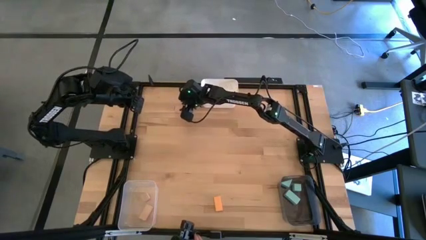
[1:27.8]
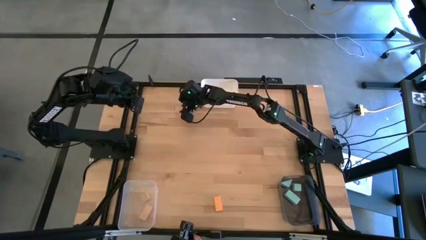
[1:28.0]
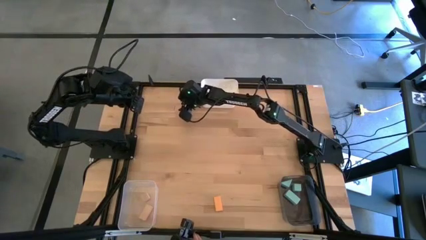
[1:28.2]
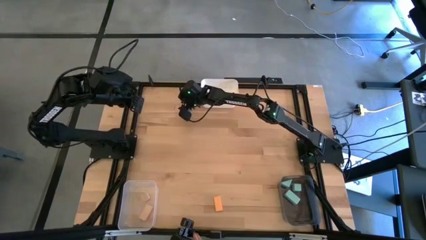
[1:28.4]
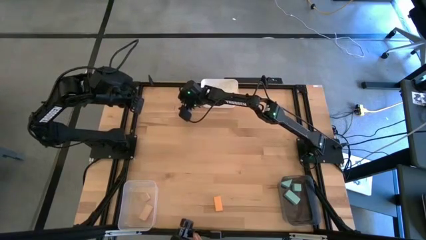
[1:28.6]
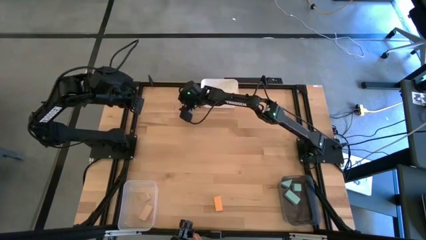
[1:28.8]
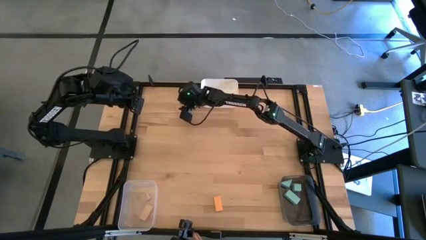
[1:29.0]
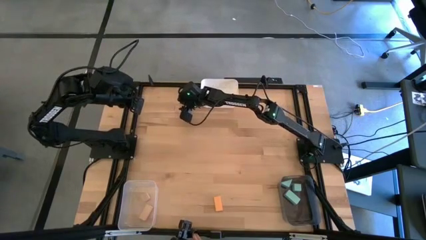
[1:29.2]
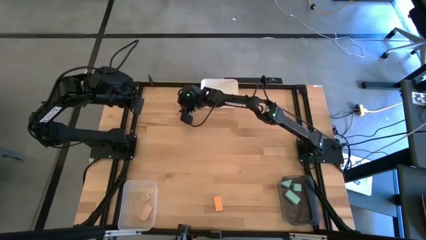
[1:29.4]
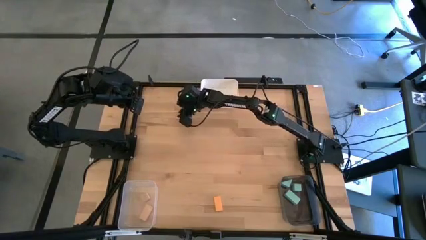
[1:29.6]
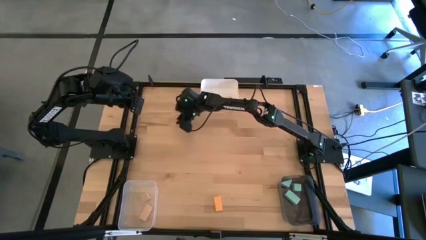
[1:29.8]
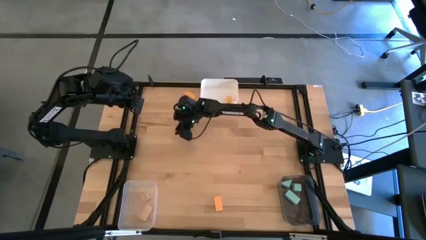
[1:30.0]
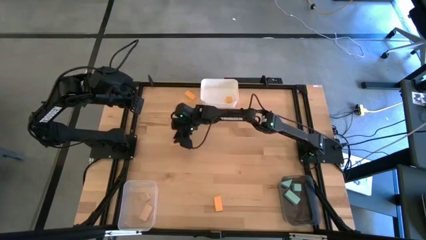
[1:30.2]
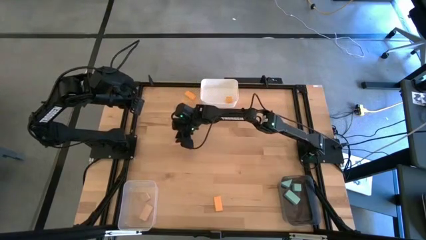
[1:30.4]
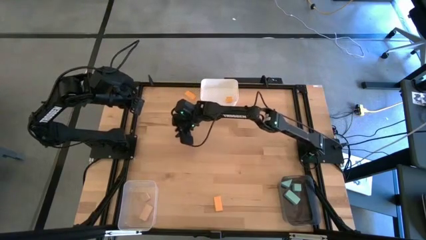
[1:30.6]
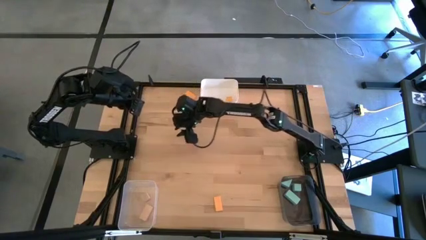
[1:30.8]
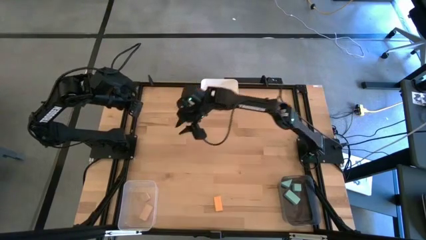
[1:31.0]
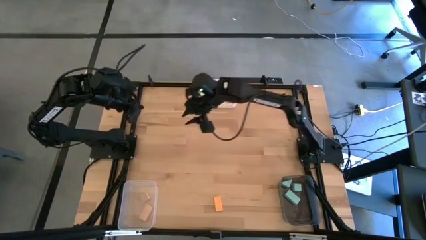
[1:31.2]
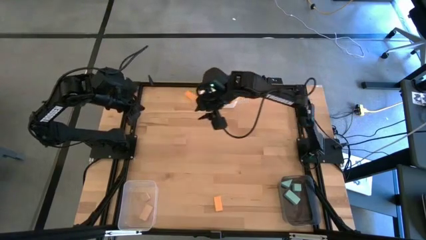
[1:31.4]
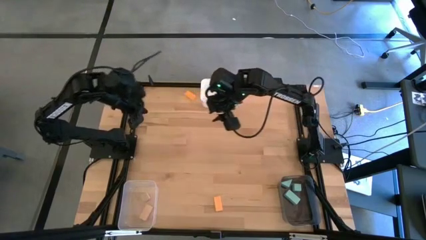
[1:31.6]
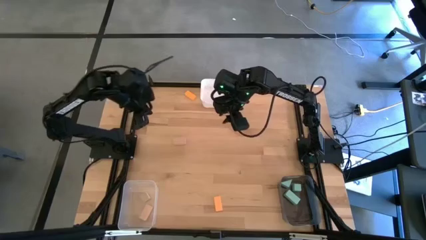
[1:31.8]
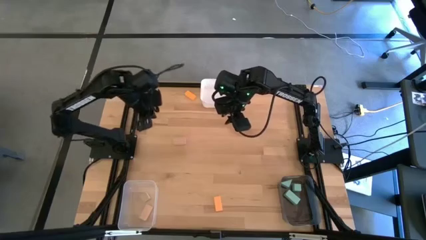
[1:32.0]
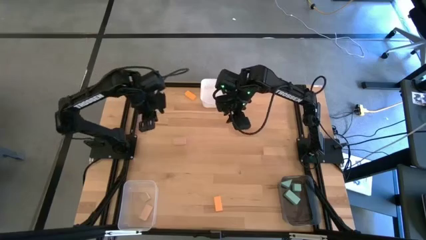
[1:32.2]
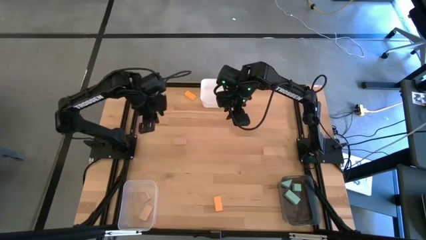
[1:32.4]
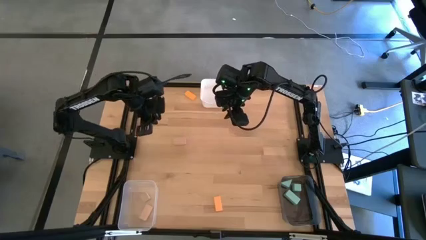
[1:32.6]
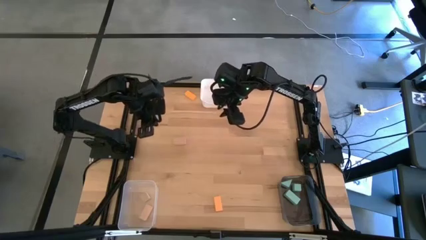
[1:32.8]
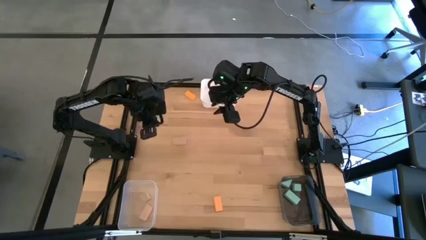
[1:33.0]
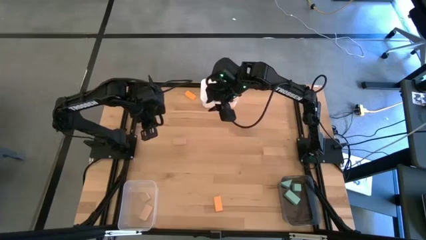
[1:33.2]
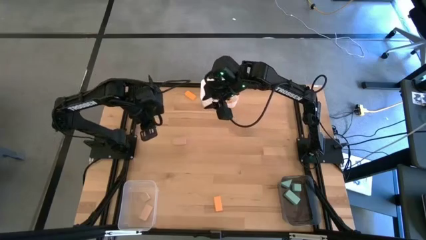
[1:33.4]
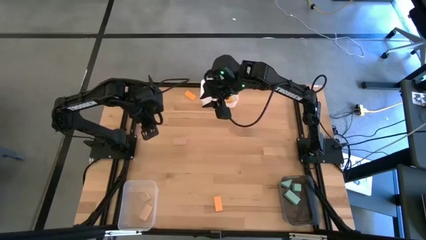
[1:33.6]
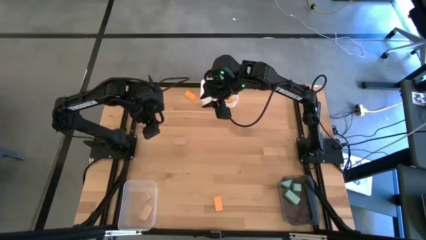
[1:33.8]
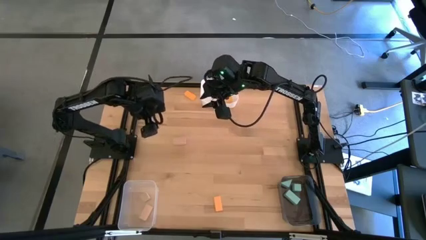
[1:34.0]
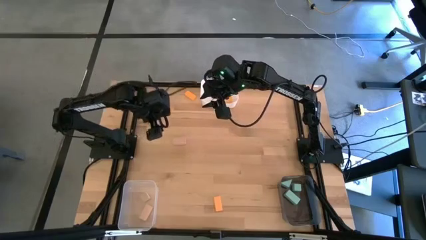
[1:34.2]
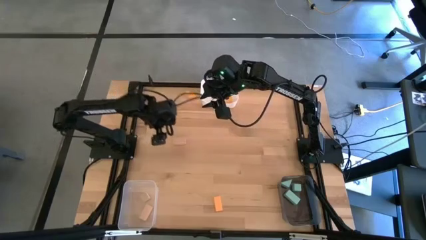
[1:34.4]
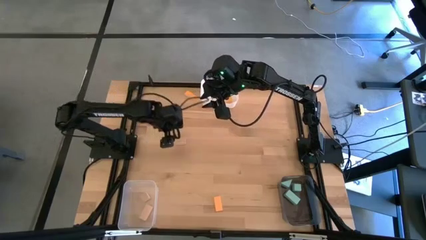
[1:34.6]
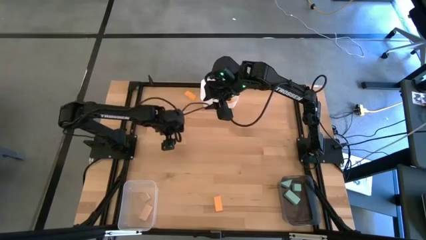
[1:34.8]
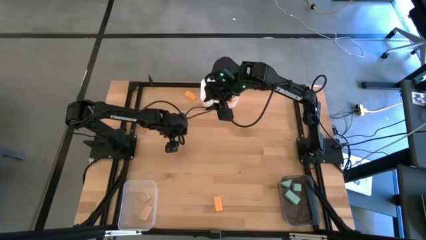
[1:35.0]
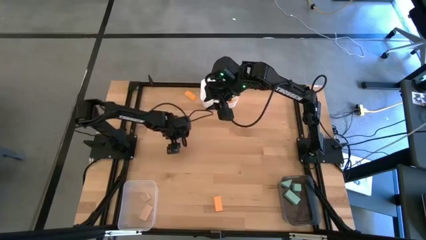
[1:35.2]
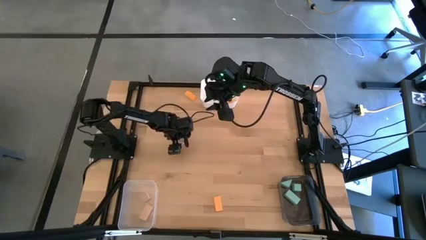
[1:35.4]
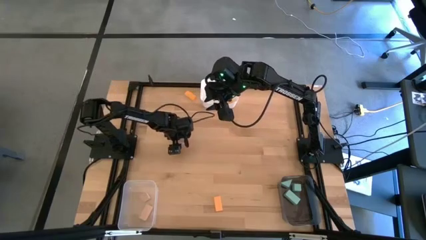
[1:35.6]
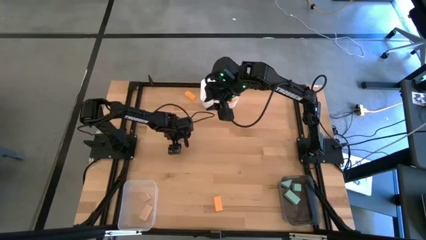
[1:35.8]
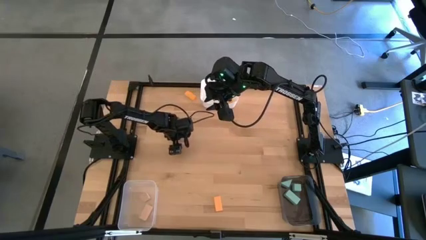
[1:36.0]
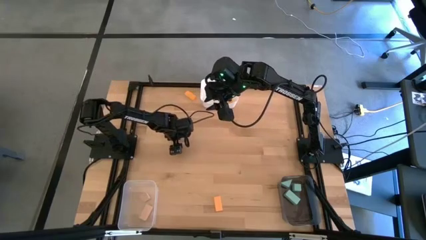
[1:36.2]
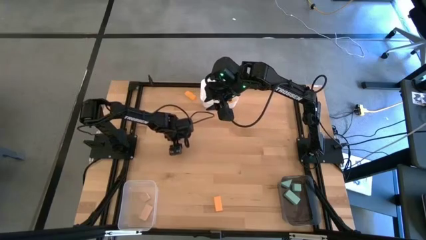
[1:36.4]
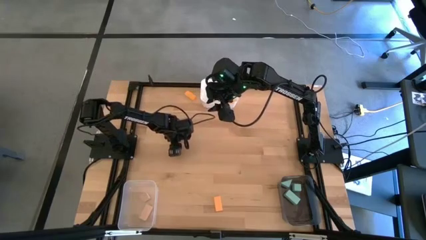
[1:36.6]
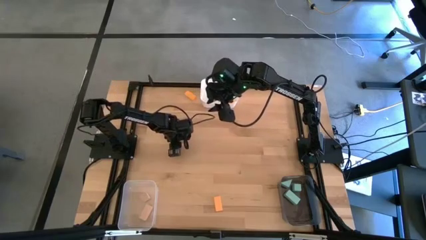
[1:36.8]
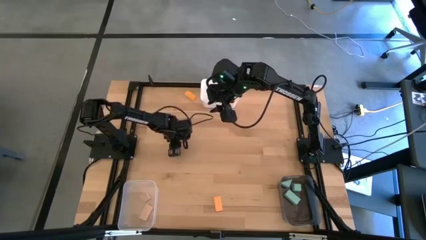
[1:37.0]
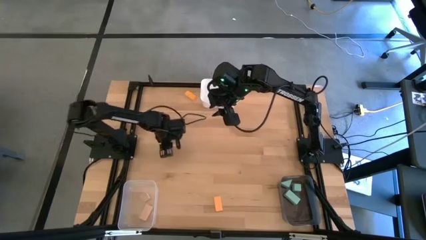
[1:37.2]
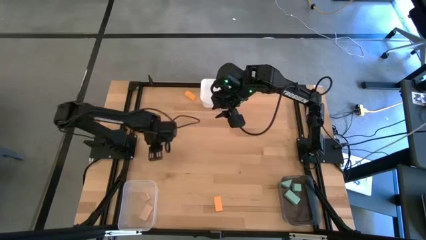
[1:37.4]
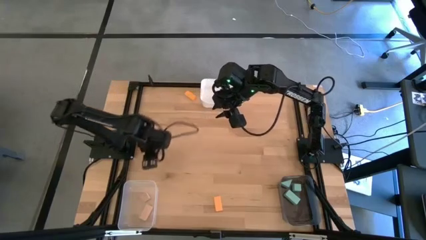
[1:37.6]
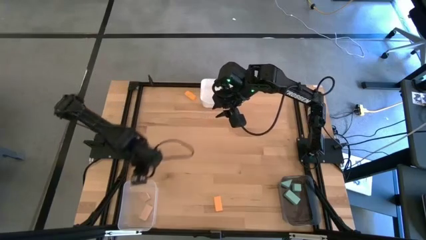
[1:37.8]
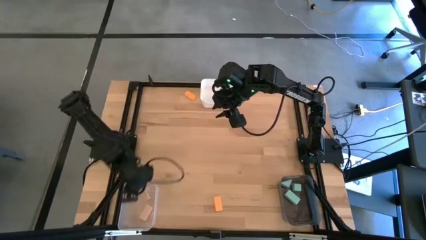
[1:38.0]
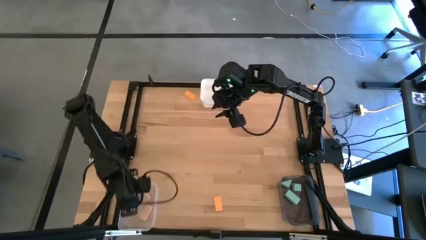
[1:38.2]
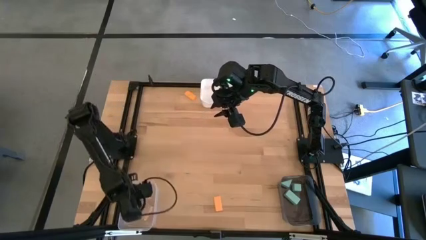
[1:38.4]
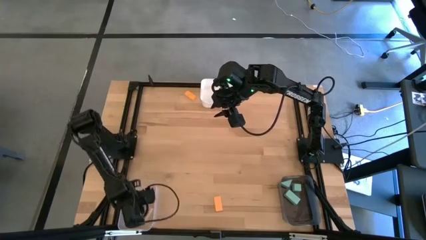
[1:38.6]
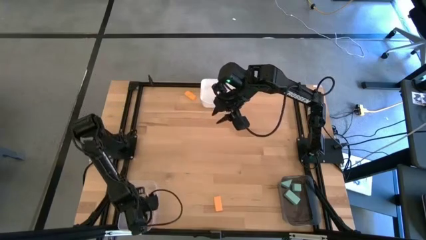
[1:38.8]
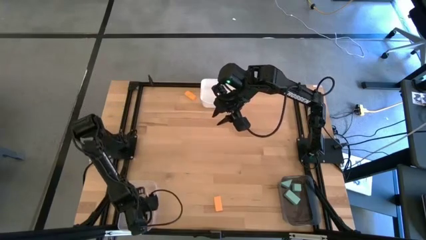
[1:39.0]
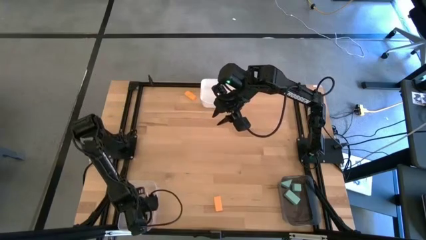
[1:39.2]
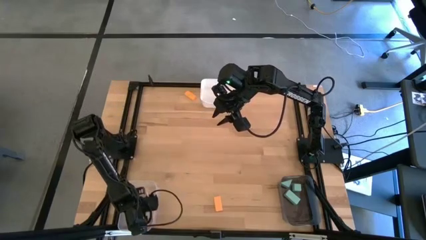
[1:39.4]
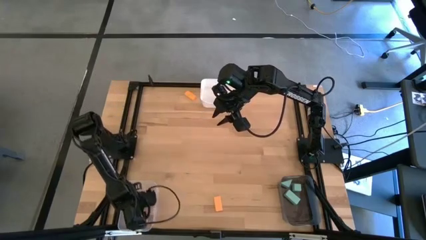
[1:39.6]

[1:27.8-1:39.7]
Task: Sort & place blocks by color
Put the white block into the transparent bin

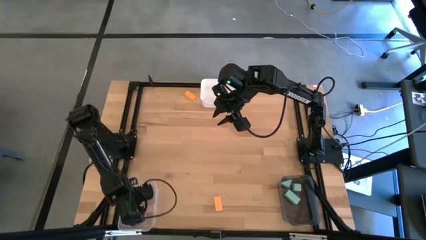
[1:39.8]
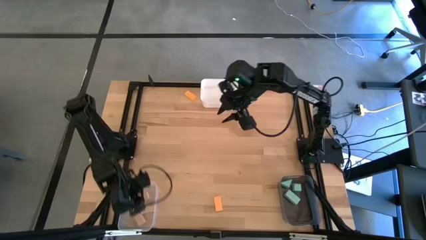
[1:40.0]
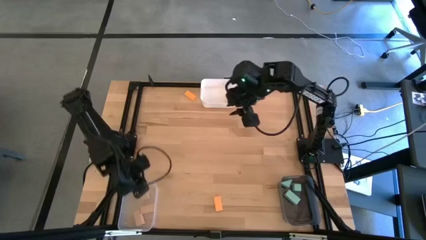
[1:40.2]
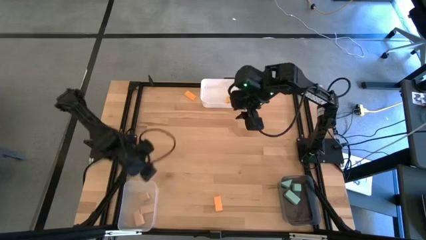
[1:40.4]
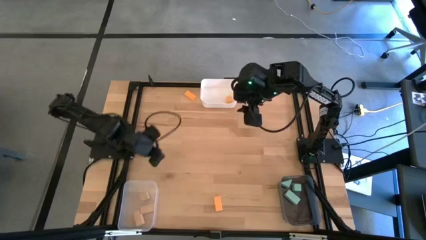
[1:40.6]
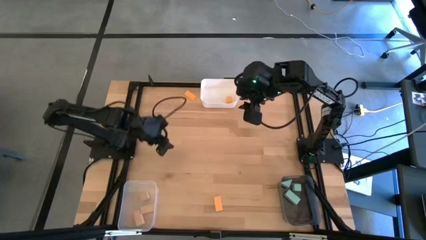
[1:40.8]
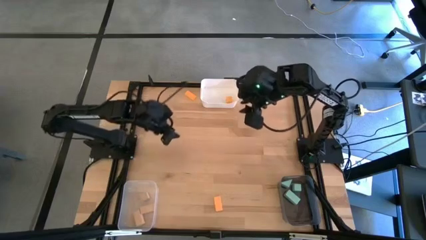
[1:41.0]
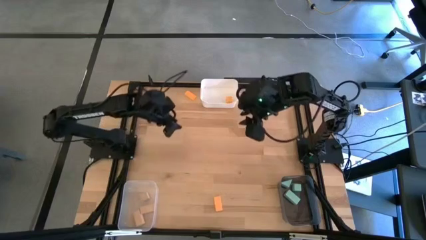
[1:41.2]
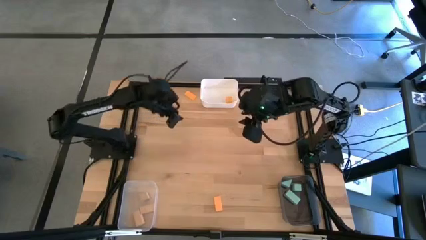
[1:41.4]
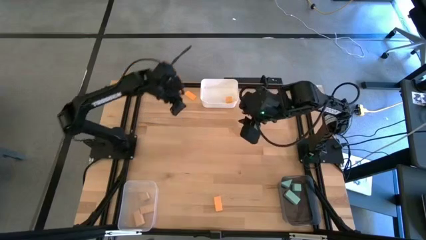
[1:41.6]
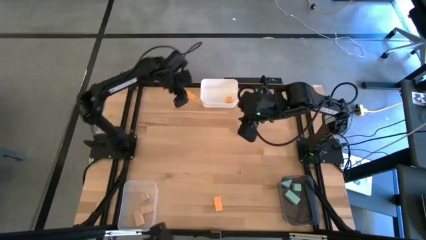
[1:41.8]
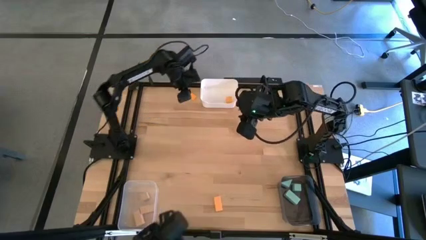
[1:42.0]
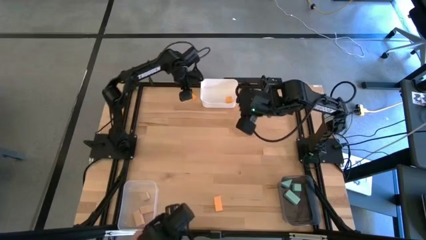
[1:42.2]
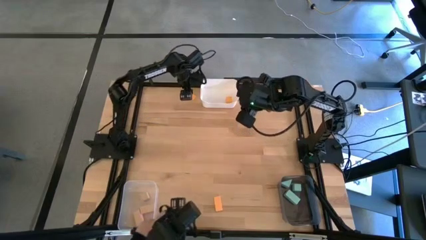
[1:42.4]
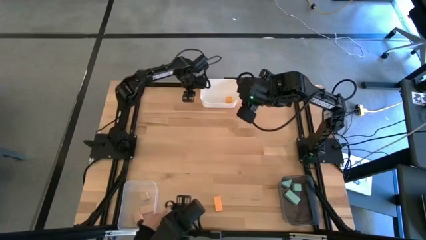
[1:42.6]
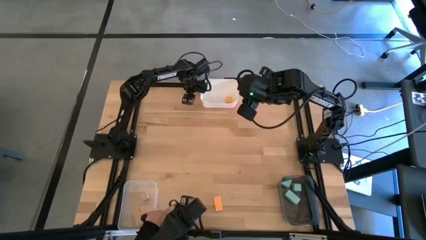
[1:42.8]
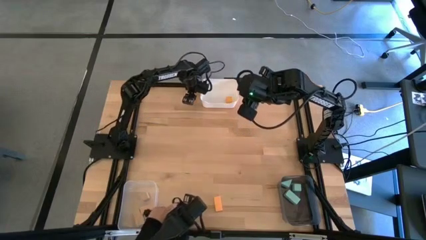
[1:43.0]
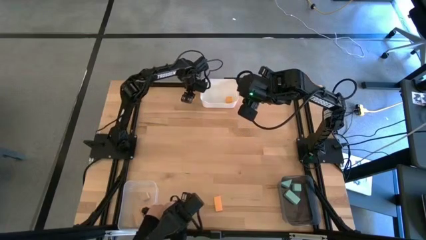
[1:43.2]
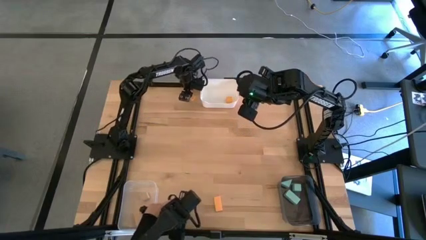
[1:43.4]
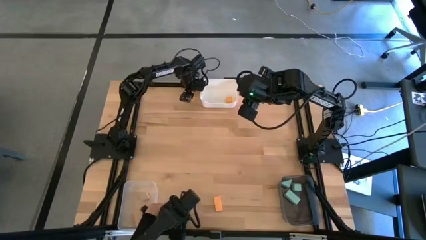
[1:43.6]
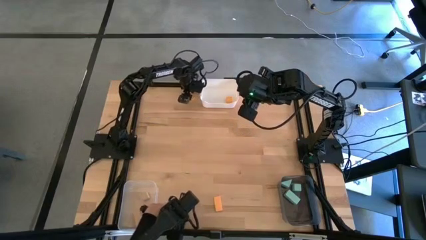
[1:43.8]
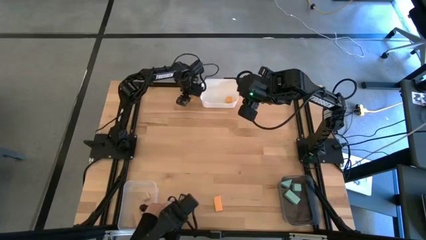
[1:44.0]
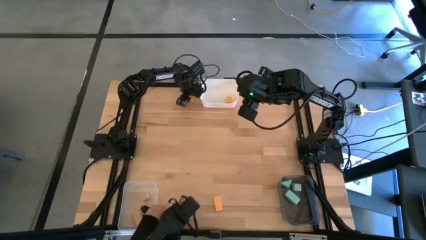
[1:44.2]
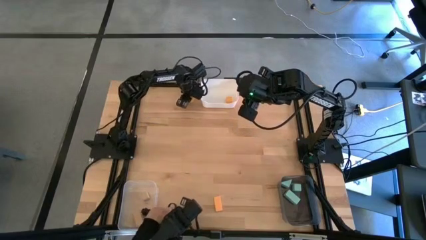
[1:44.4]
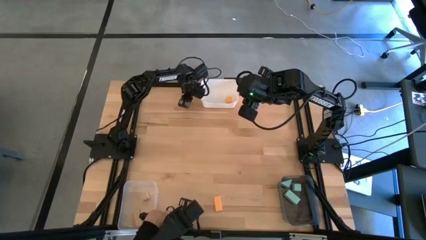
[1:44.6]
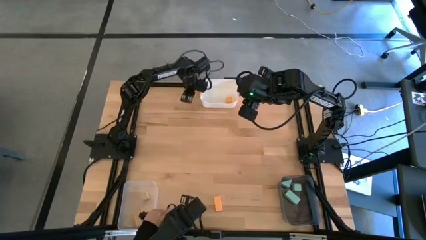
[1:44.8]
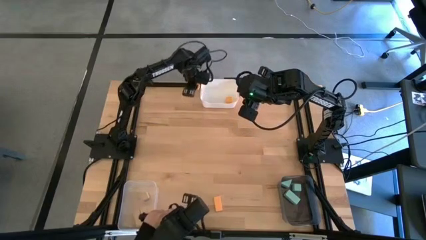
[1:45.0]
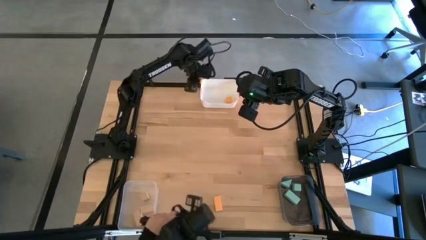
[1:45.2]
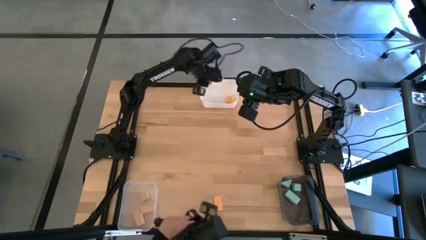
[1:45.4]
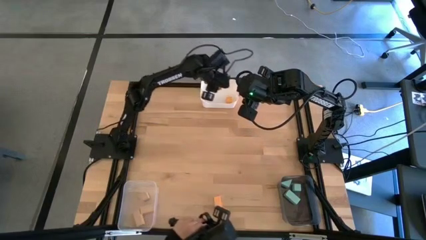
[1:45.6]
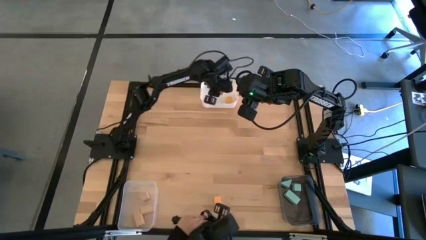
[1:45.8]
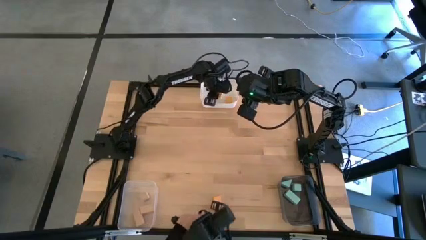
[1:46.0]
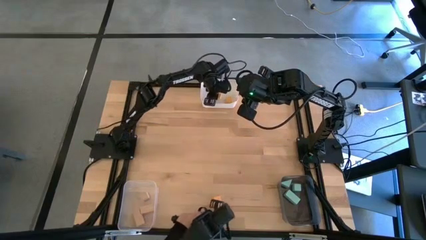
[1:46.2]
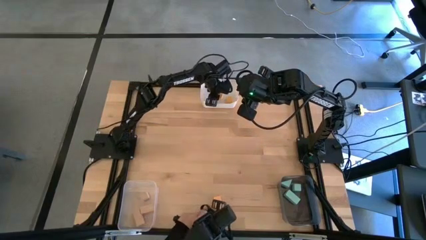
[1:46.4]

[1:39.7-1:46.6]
Put the top orange block into the white bin
